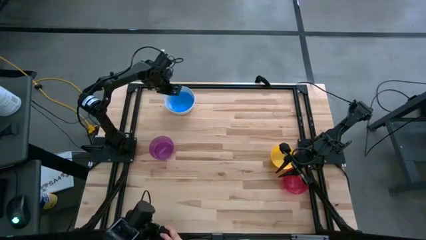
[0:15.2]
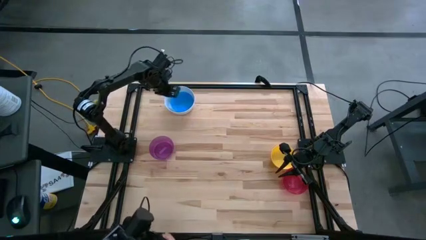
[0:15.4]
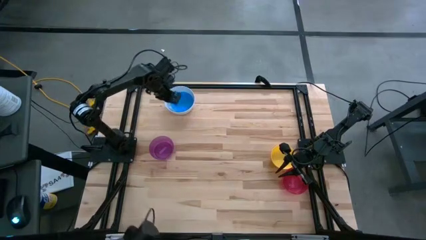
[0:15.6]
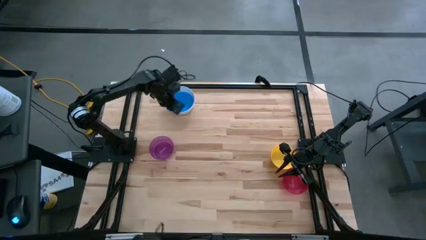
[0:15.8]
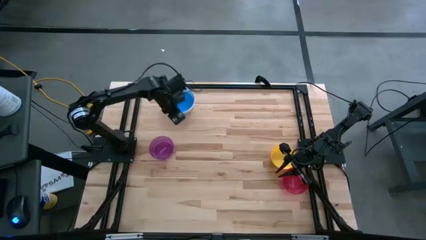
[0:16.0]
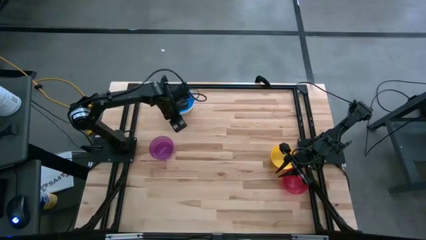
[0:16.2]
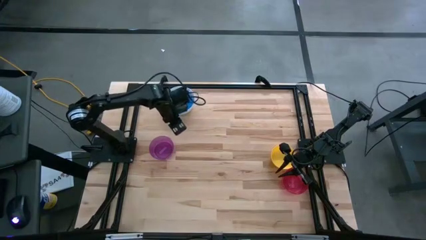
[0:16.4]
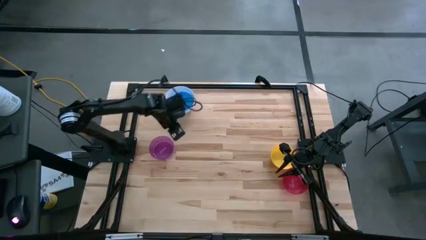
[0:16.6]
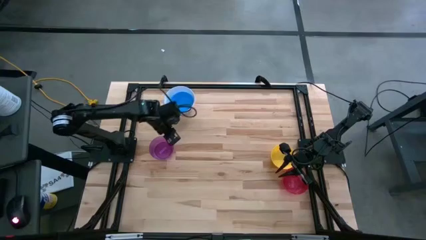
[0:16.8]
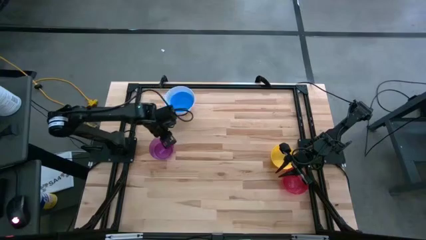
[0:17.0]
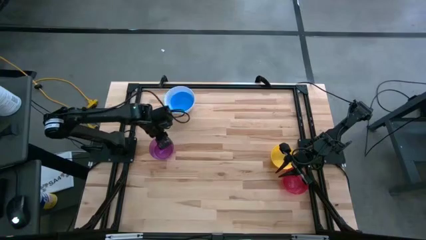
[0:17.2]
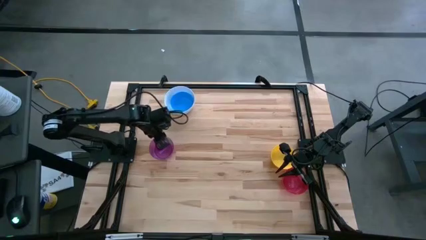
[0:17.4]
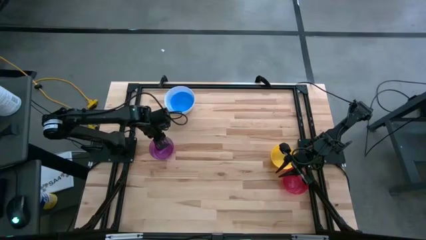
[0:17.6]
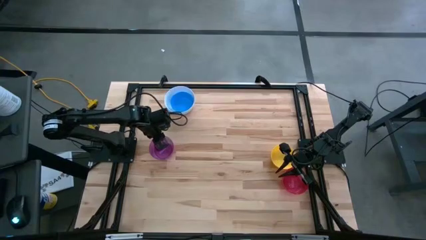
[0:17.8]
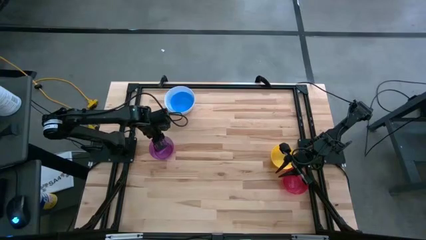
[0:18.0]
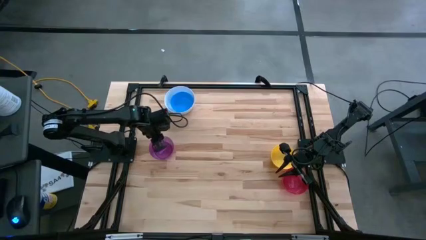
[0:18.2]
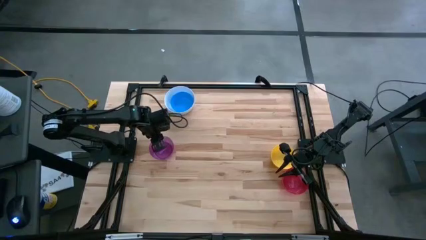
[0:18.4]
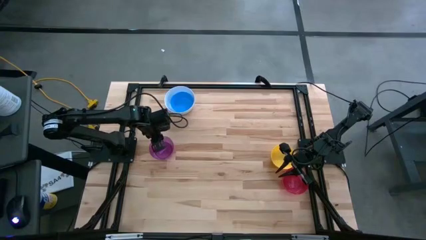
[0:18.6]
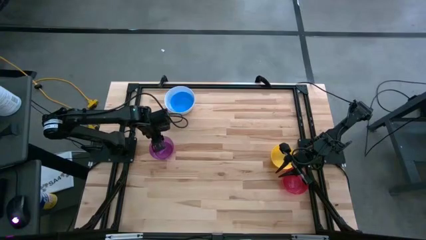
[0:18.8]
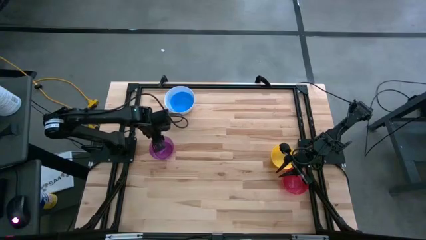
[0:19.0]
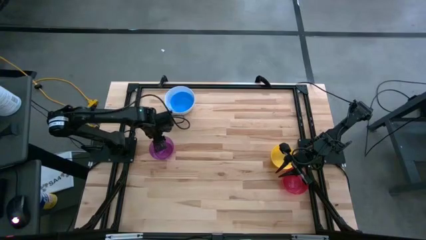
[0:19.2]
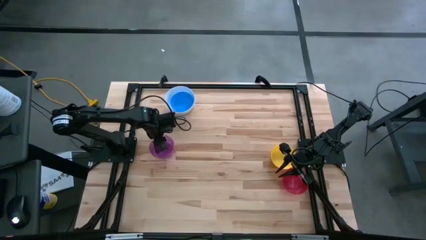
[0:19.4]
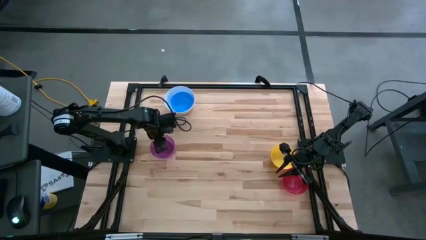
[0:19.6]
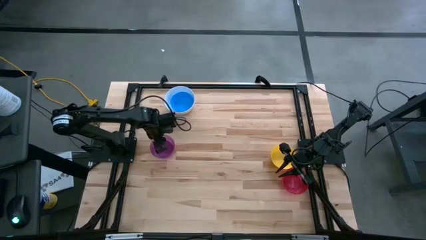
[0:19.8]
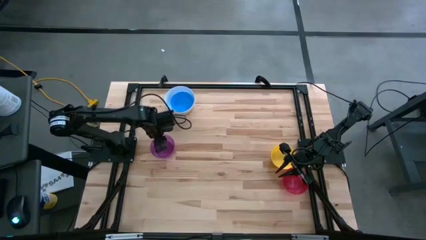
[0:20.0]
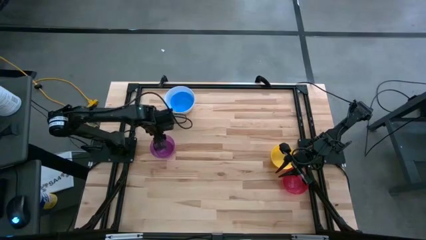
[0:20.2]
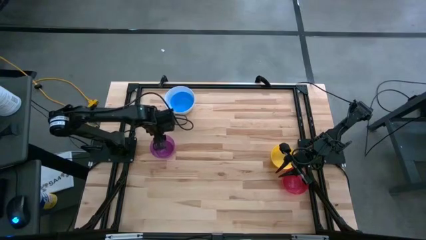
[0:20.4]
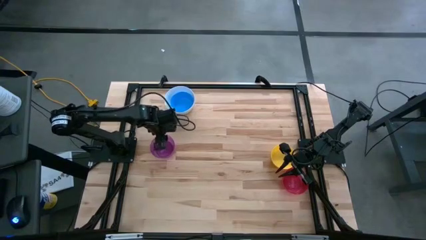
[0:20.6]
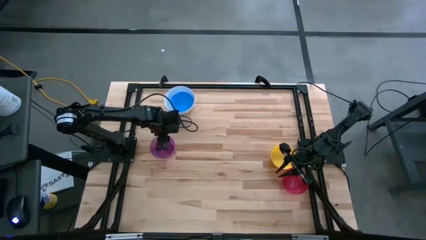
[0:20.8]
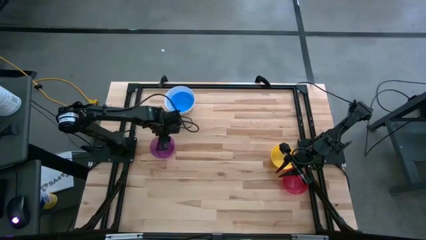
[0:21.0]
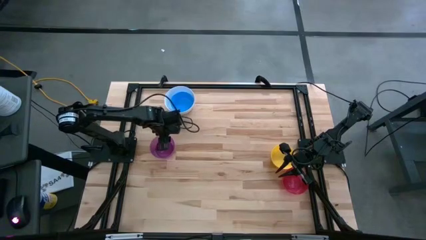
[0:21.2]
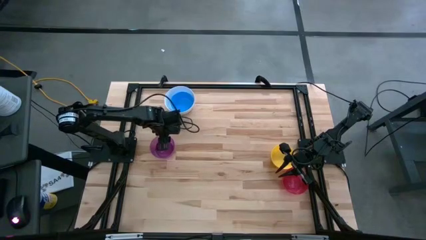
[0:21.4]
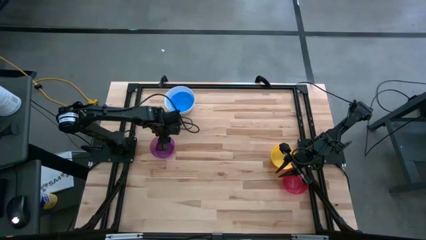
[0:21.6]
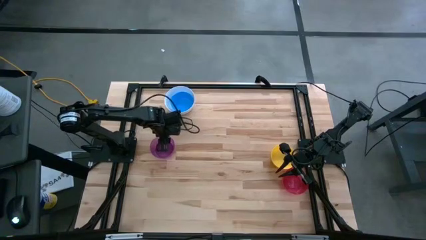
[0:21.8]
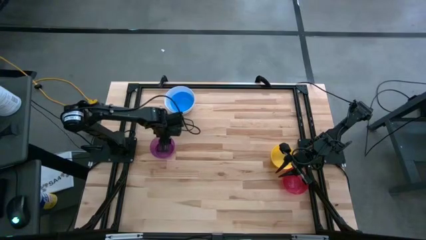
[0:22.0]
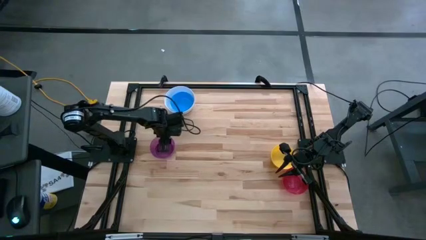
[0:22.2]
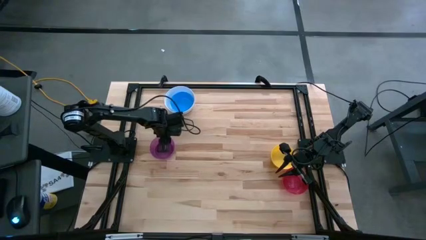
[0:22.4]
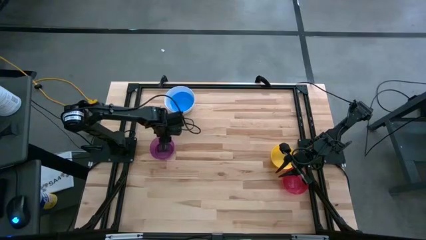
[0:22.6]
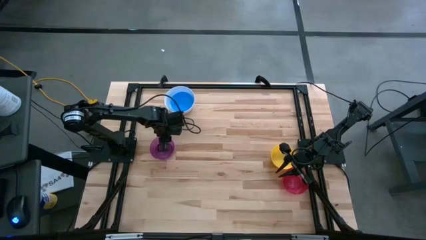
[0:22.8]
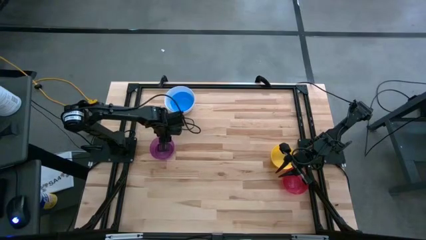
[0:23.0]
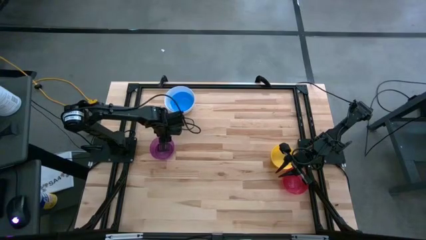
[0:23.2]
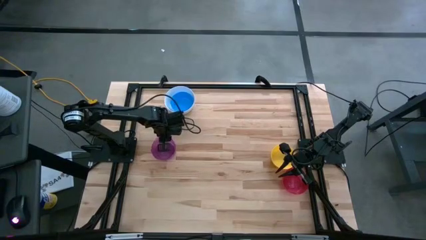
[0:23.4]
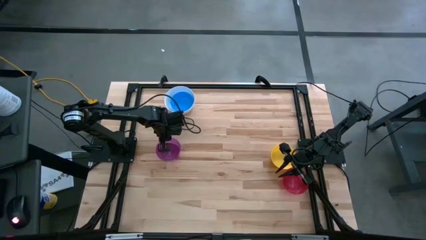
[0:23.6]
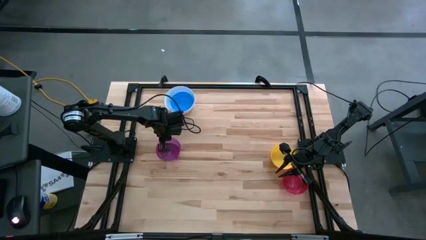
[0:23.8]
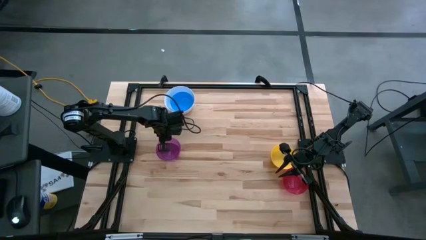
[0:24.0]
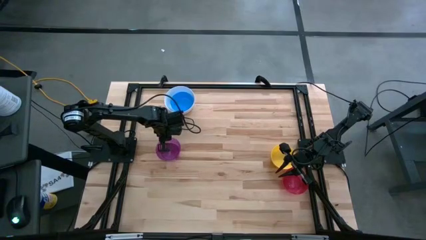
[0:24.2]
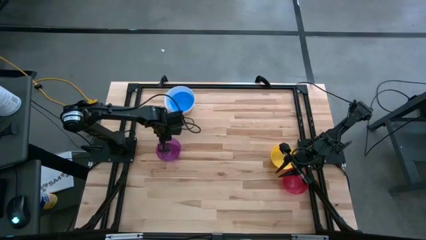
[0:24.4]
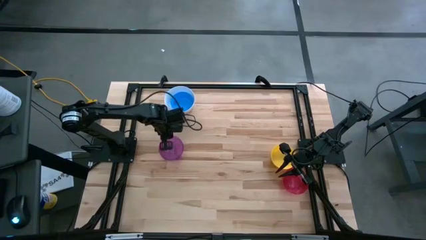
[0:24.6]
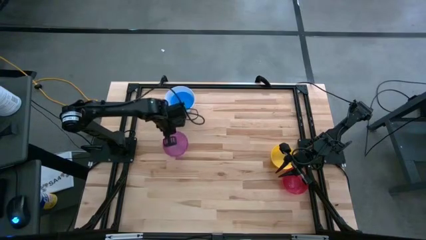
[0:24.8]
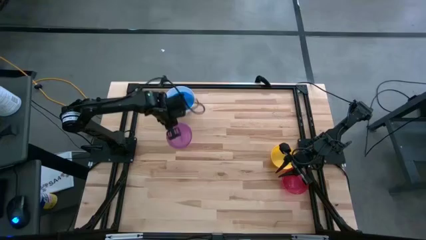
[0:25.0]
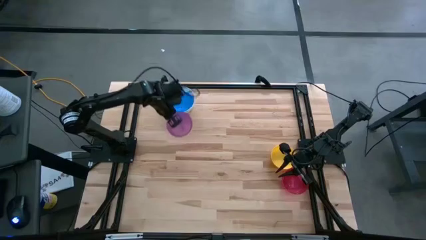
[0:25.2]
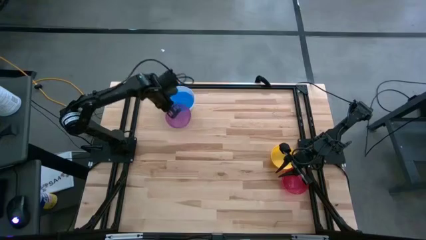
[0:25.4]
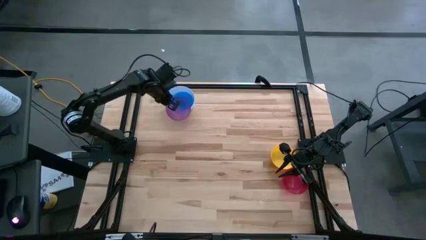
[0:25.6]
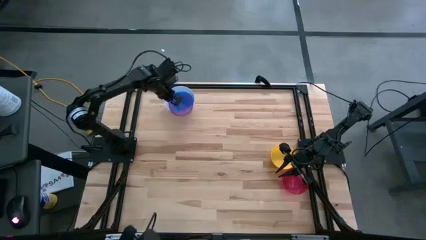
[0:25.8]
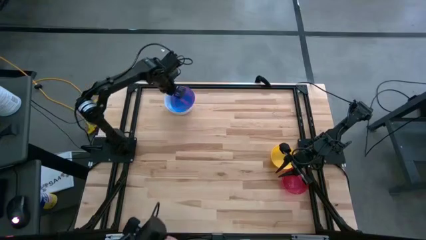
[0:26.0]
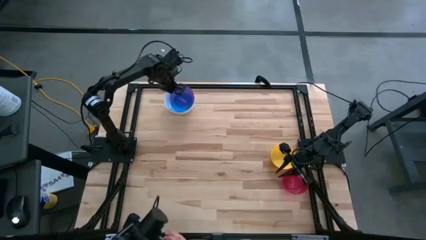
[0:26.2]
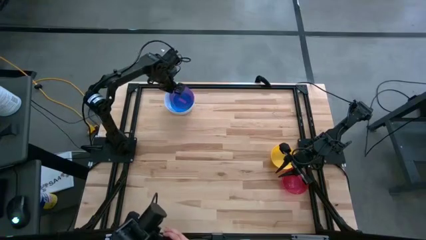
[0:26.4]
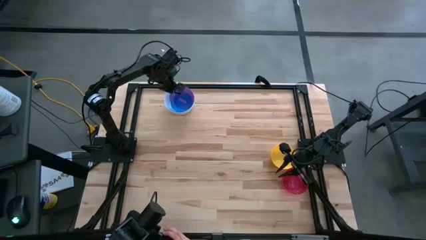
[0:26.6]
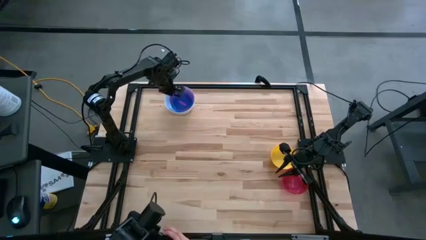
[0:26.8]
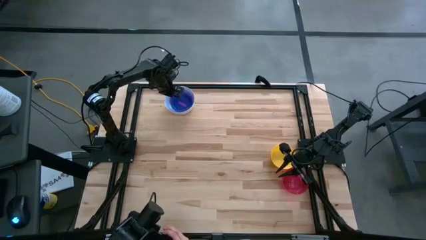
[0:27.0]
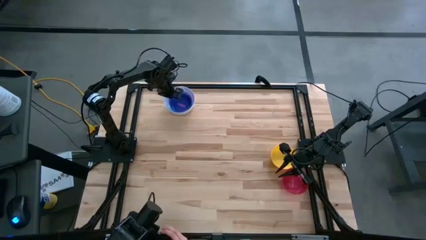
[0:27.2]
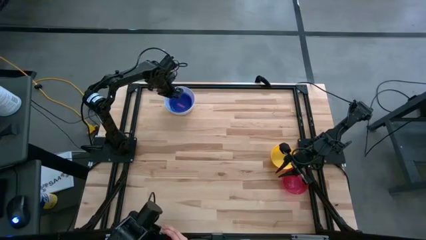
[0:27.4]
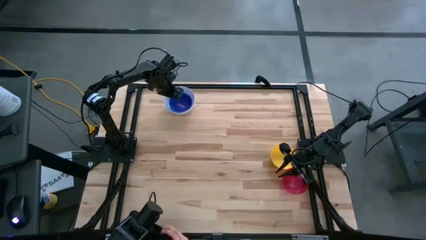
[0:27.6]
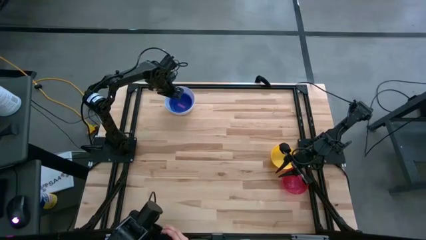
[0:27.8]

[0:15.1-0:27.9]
Stack the violet bowl on top of the blue bowl

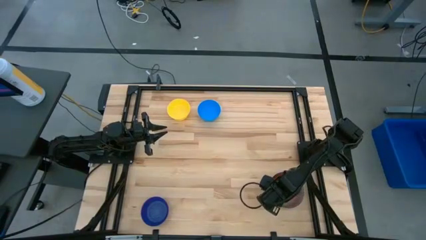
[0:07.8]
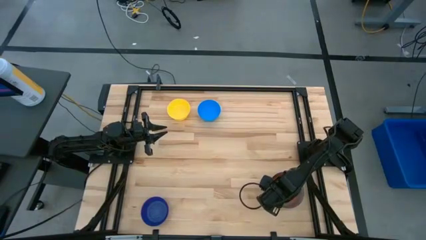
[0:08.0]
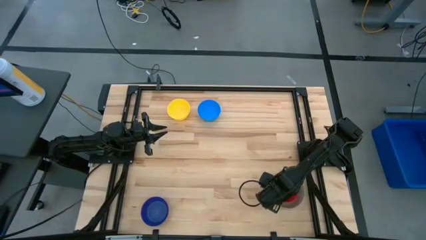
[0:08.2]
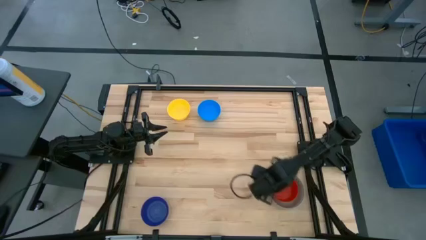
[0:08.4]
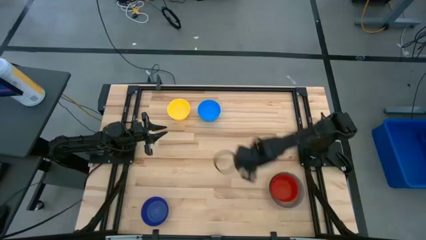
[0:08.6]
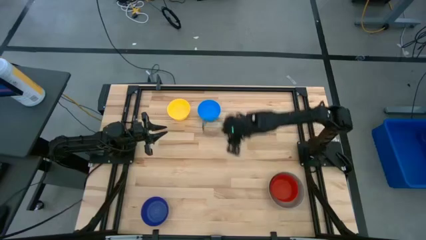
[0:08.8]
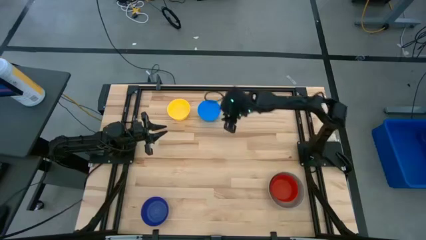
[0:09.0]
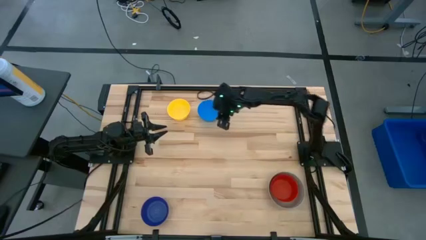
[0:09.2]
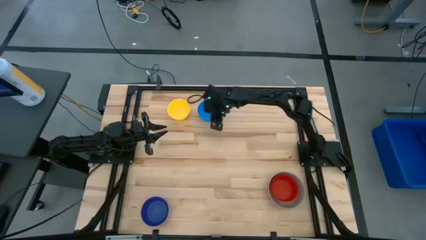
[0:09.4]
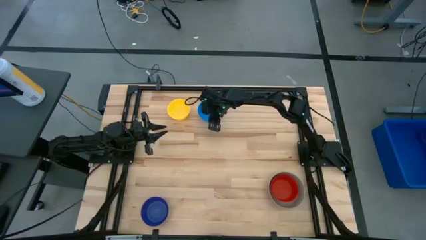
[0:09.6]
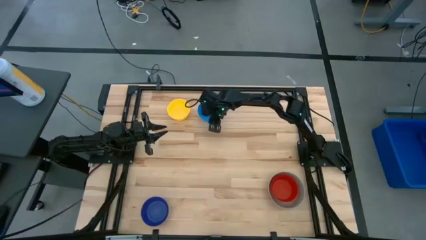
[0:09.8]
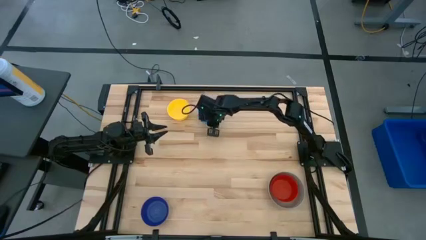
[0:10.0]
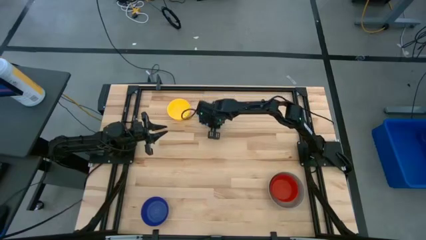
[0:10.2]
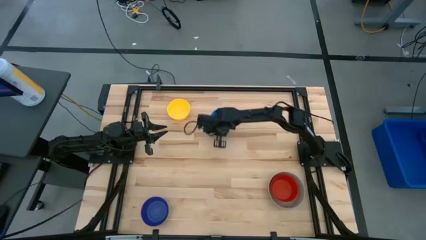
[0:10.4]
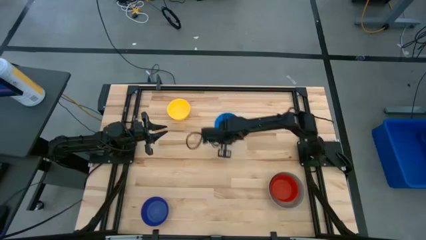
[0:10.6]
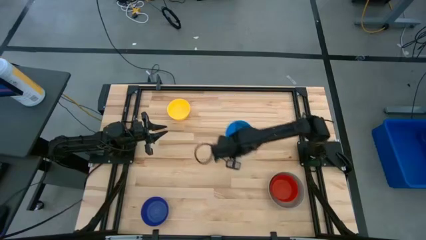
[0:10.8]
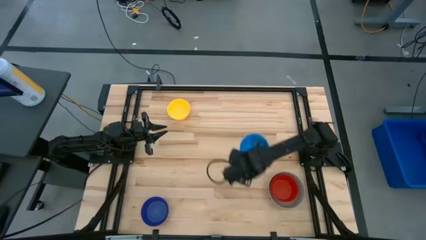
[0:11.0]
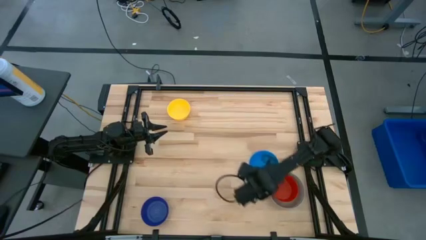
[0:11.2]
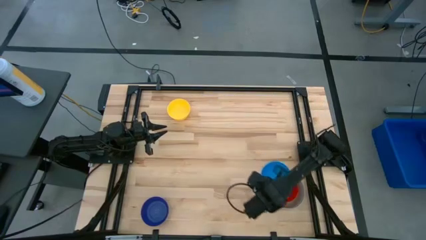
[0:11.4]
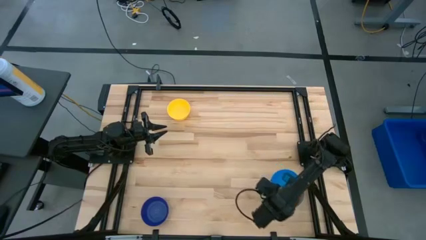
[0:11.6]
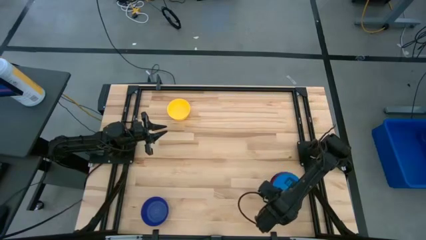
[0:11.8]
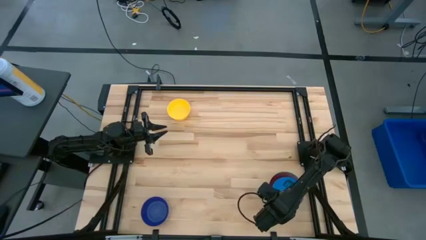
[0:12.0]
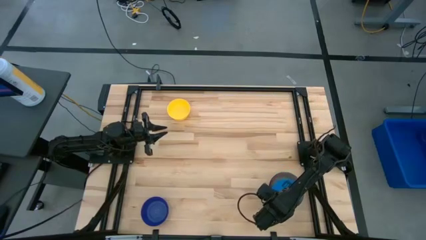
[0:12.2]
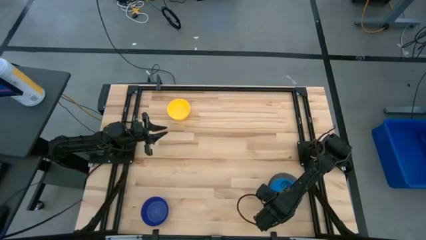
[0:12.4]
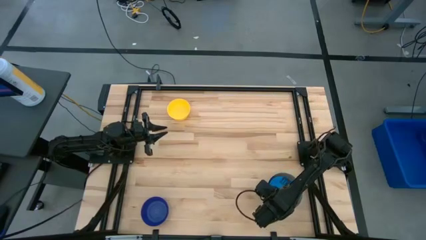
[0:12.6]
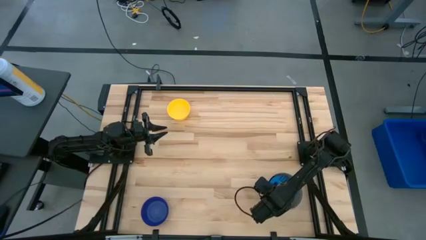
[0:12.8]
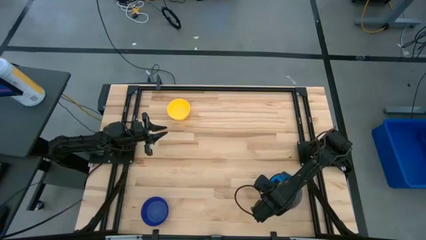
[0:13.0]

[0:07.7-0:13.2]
Stack the blue bowl on top of the red bowl
